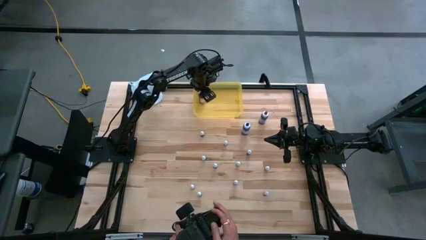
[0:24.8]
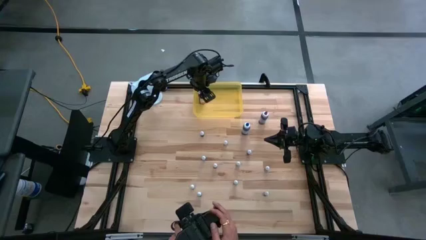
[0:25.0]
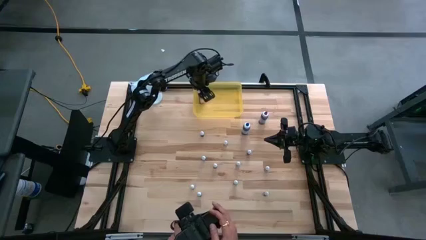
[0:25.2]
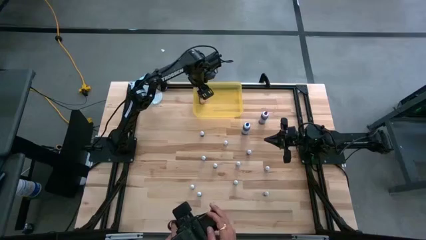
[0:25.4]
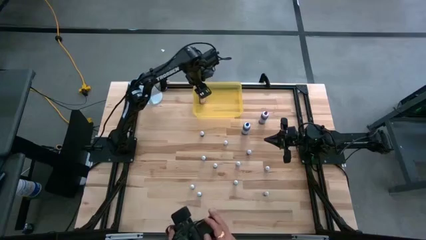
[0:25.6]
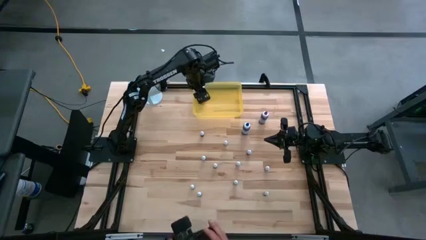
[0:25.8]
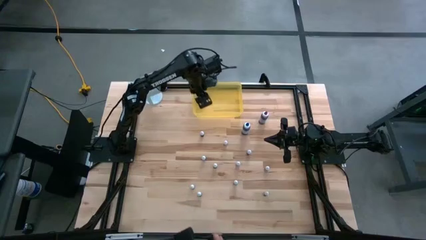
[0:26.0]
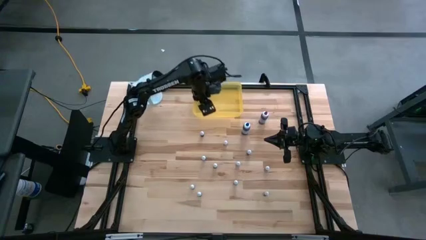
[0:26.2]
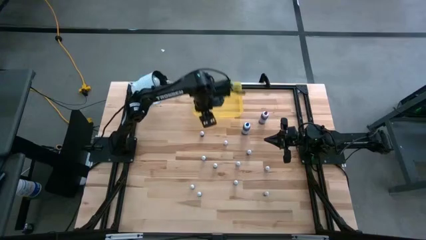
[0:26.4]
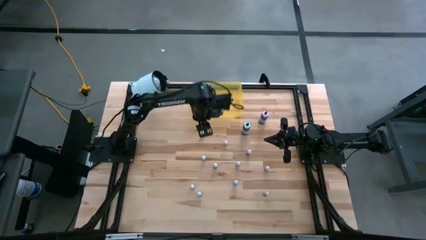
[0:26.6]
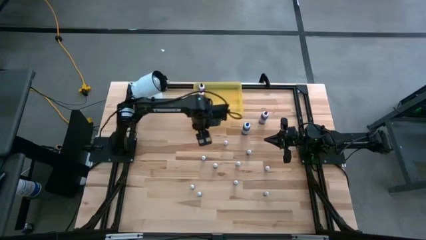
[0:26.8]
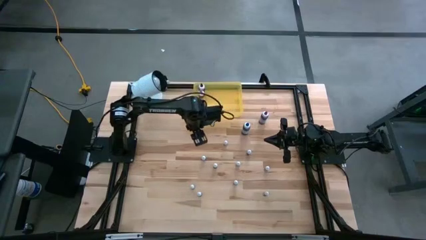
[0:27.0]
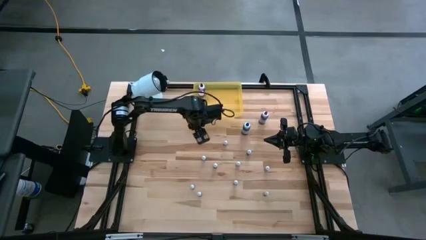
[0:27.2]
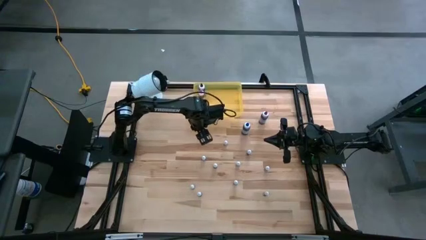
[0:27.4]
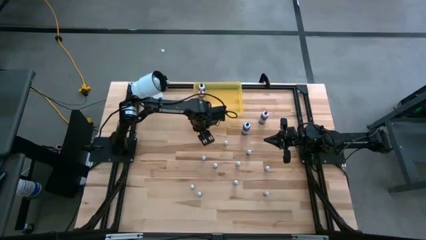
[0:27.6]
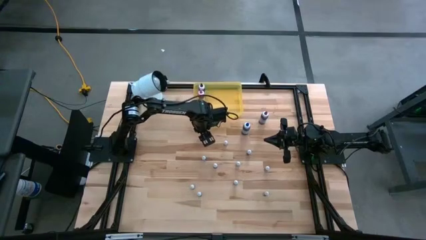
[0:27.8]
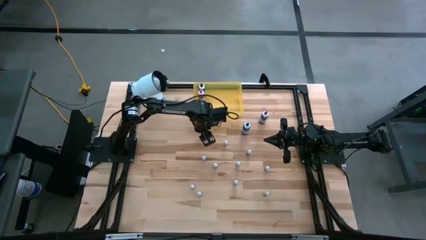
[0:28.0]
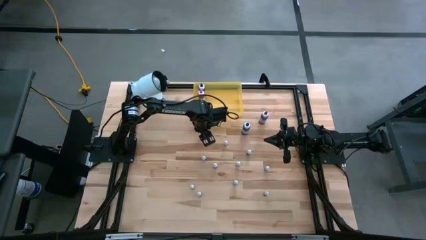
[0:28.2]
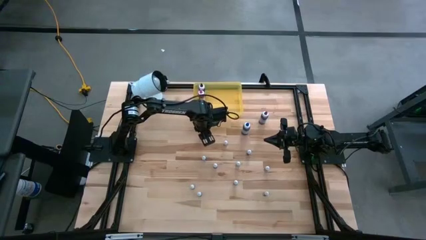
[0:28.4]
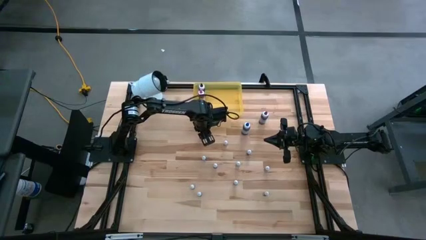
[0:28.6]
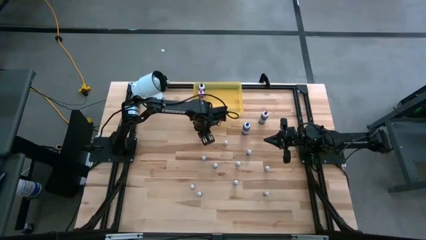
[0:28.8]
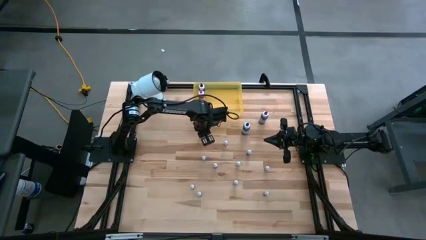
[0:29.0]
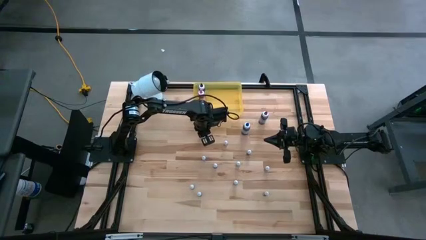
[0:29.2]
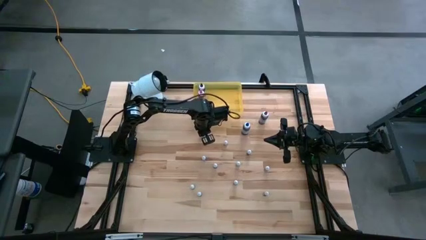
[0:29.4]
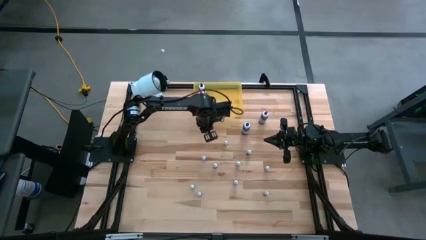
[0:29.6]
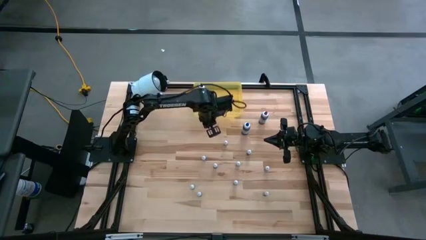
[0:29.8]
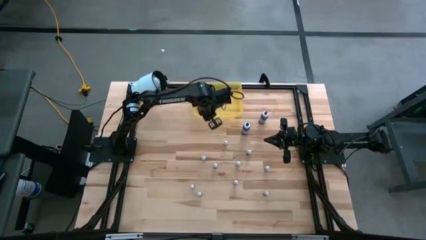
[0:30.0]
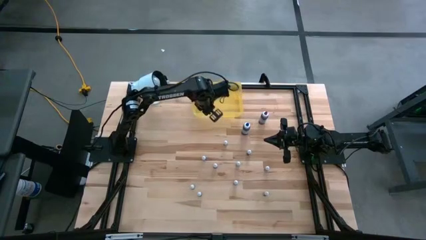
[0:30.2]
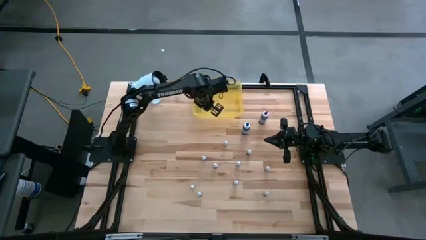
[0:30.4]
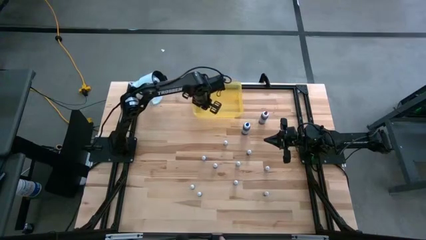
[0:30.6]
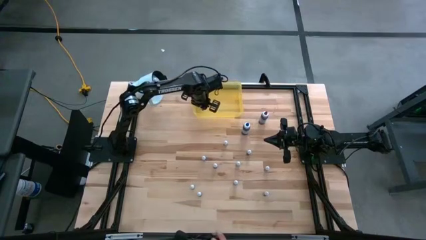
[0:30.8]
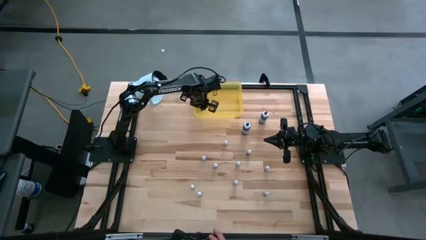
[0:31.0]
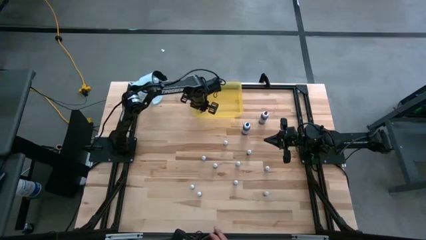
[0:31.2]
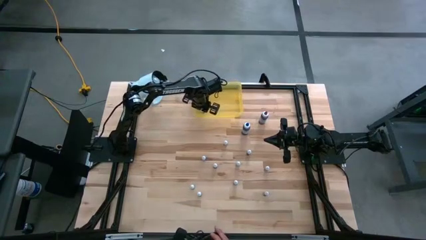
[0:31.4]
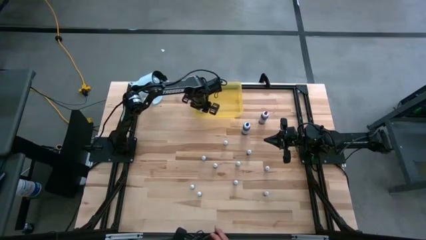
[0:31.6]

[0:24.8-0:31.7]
Task: Pick & Place food coloring
Put the top small purple food coloring bottle into the yellow container

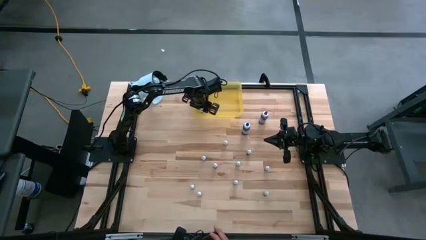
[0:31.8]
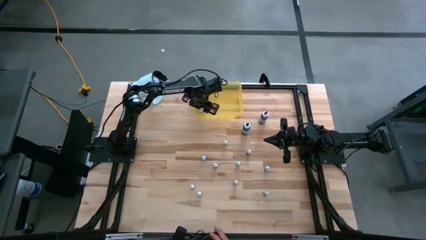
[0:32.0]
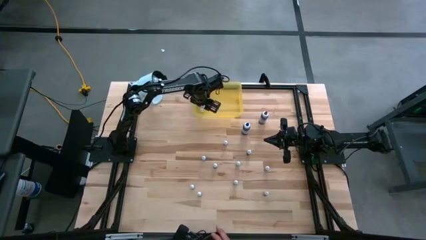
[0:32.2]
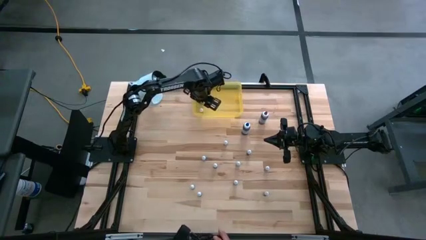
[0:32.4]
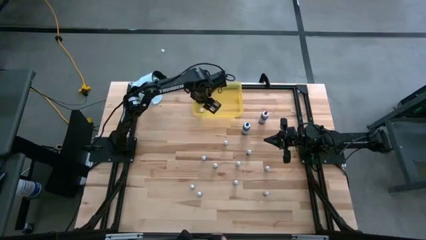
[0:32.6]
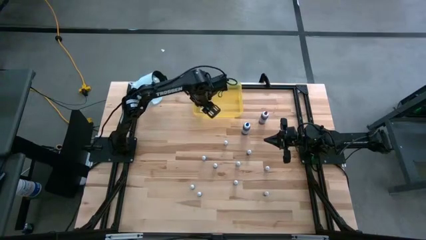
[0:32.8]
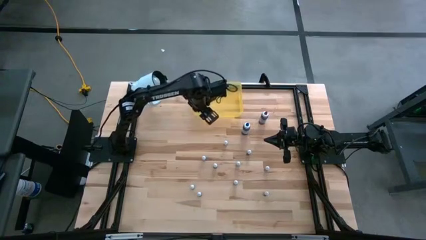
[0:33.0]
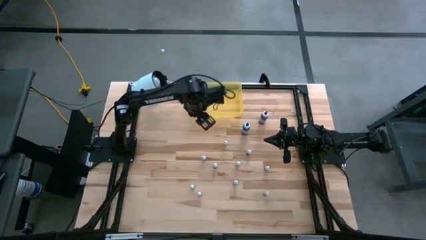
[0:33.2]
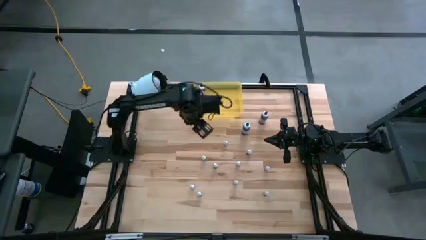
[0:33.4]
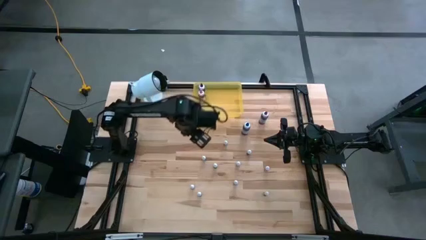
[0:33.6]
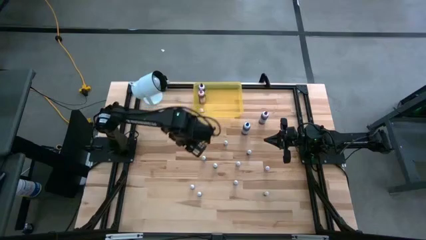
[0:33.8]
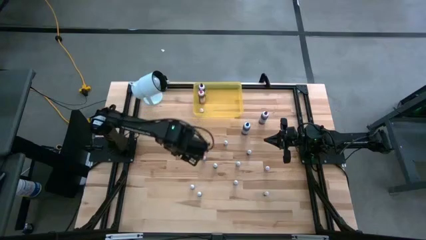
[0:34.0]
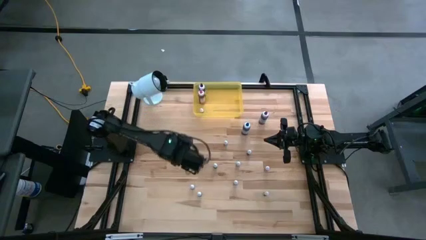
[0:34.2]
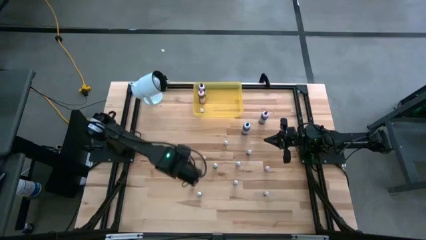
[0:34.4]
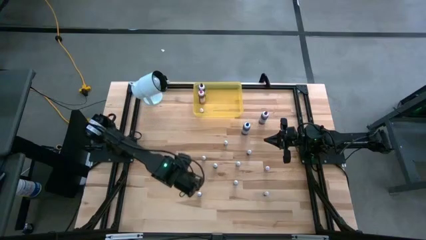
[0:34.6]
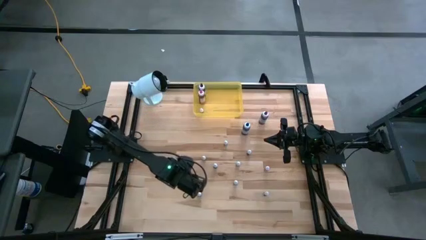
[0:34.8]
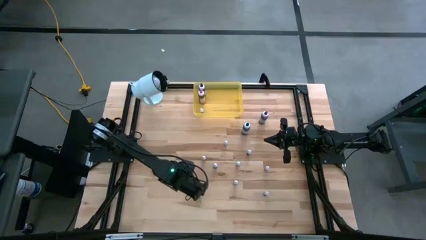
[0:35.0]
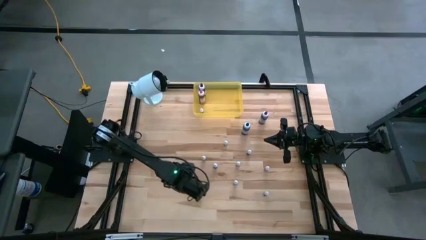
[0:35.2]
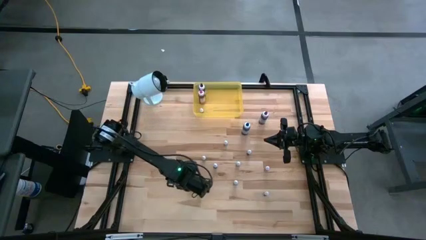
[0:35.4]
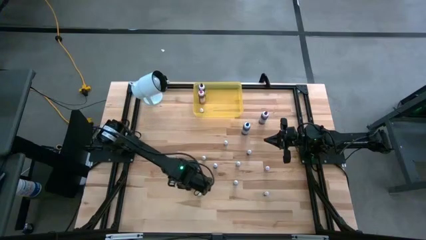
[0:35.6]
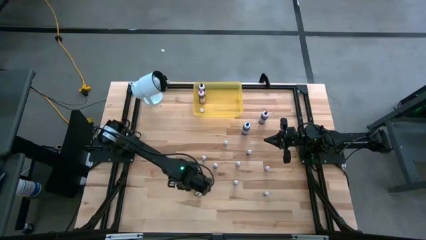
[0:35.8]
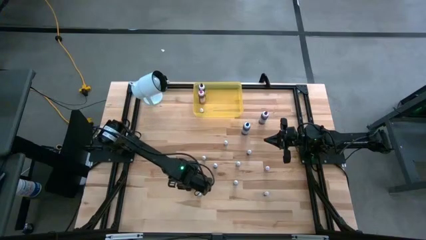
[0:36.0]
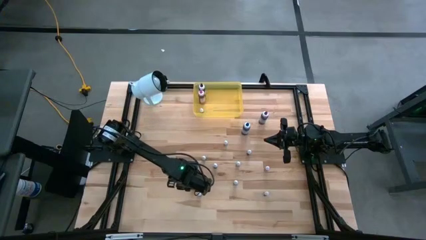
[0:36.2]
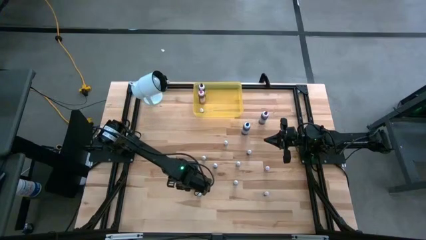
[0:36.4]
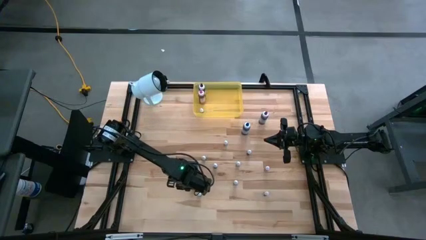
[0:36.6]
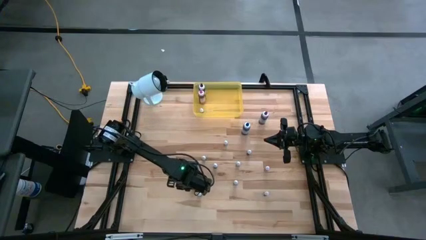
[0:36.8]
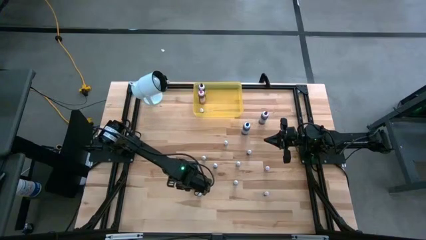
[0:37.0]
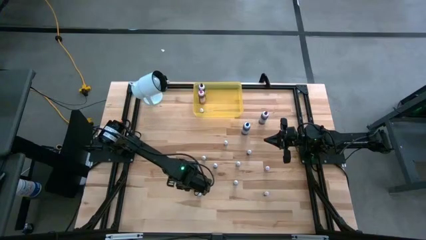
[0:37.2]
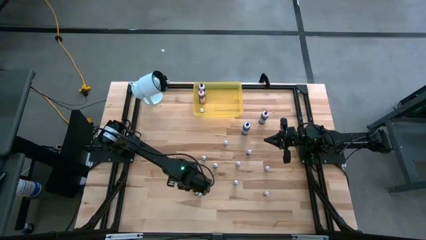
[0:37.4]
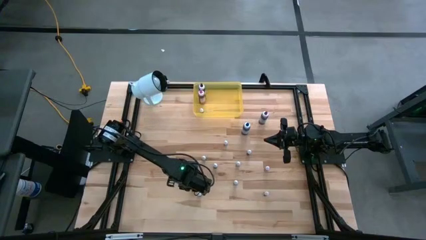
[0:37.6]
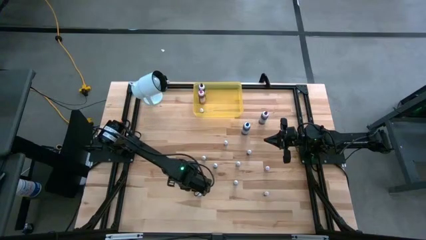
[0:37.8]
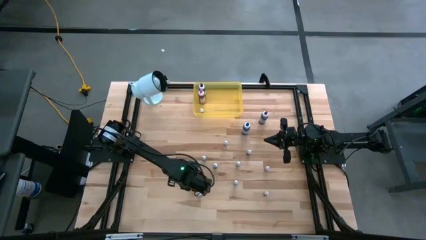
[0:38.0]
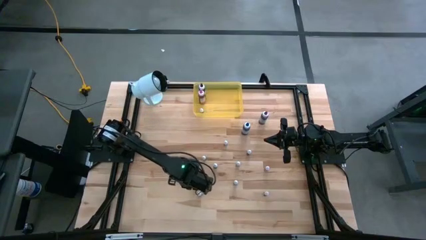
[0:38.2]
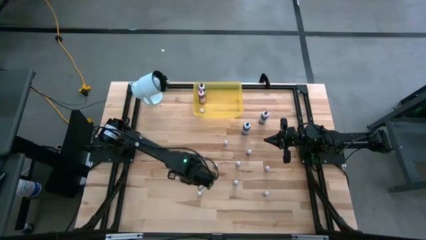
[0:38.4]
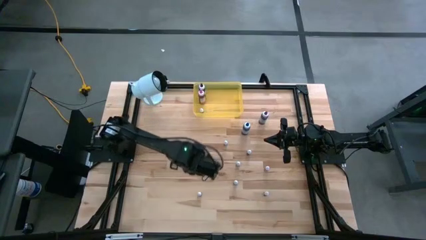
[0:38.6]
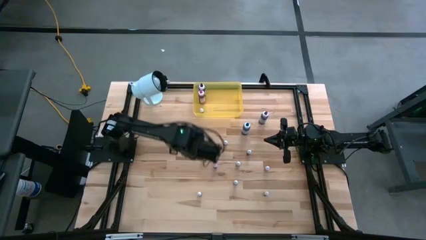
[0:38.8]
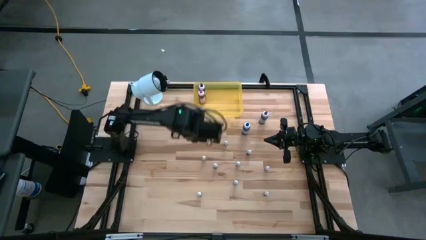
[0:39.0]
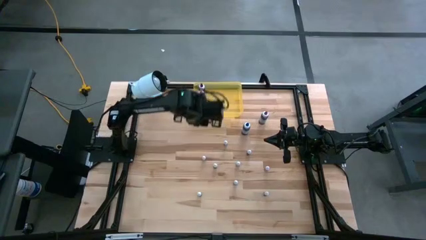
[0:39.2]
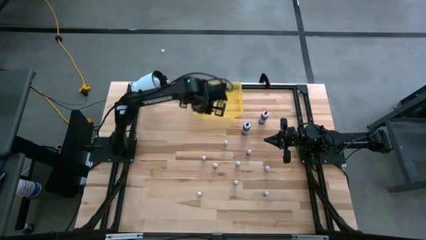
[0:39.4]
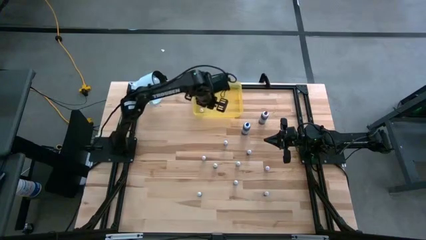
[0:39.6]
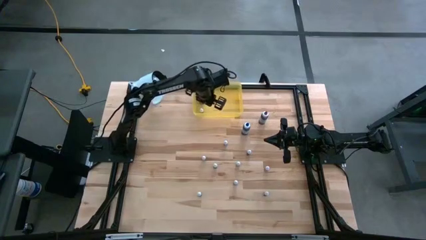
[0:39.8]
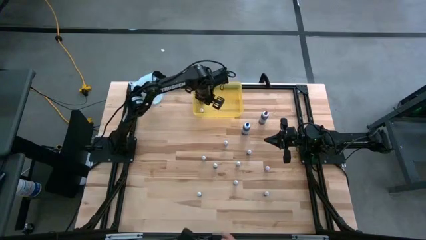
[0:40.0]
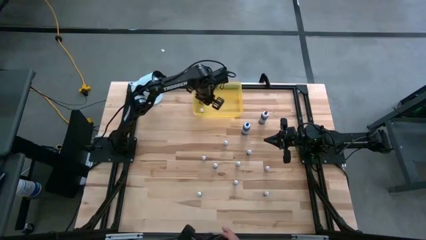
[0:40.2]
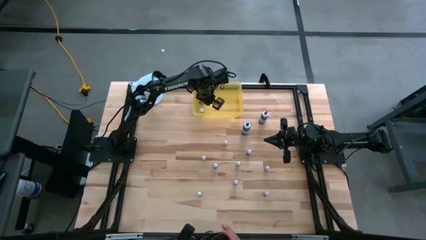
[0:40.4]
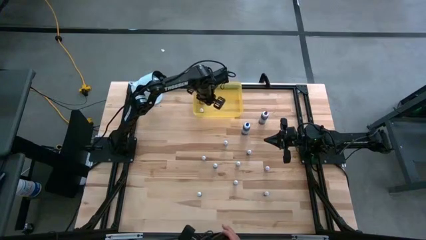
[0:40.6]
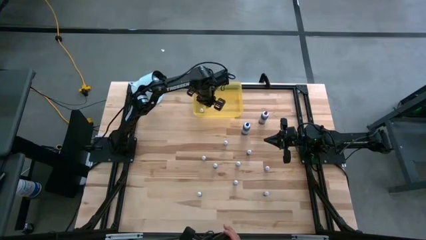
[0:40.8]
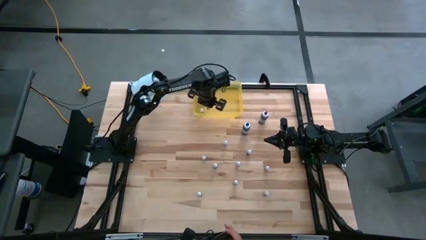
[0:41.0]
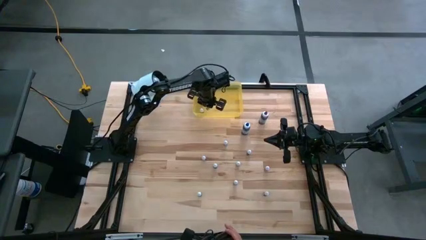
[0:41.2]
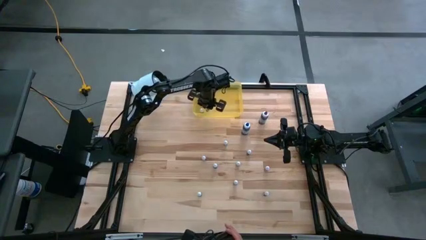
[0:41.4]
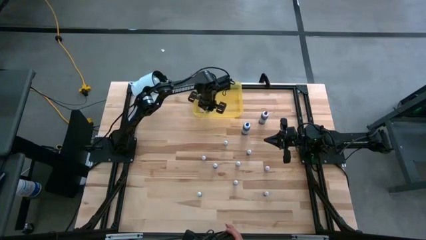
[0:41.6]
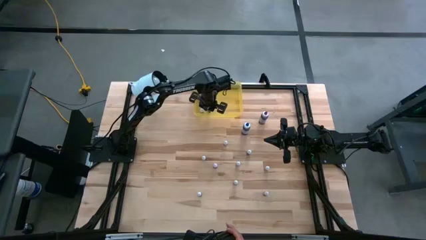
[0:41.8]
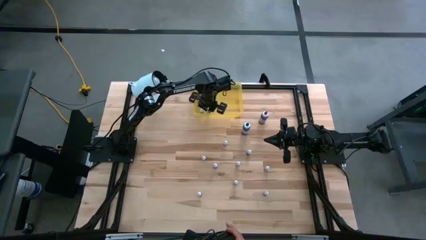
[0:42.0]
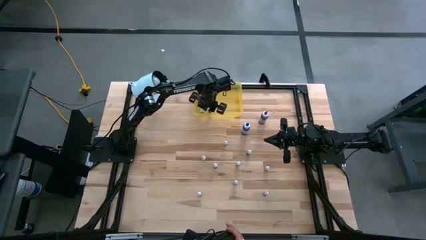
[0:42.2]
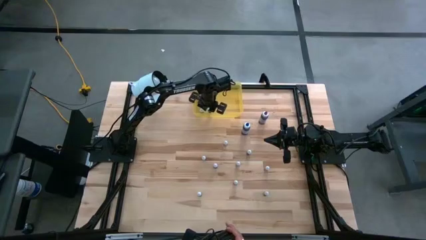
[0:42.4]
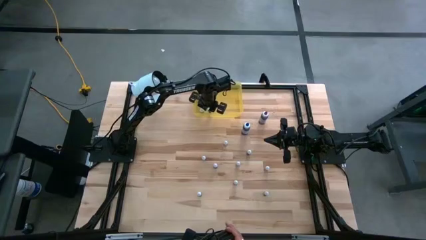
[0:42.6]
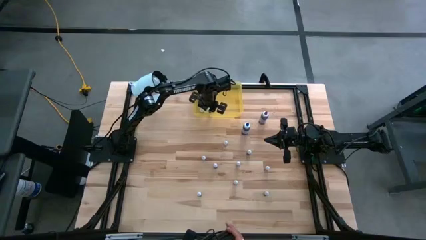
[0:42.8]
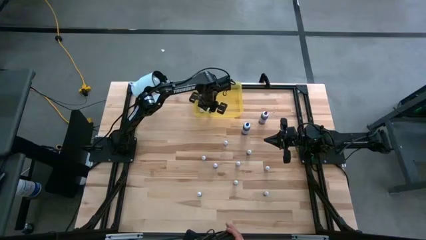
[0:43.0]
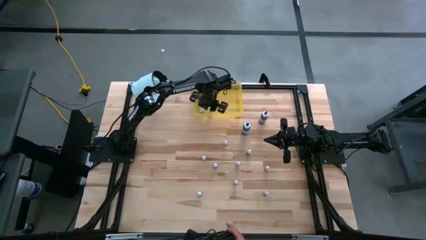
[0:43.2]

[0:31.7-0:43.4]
Put the small black food coloring bottle into the yellow container
